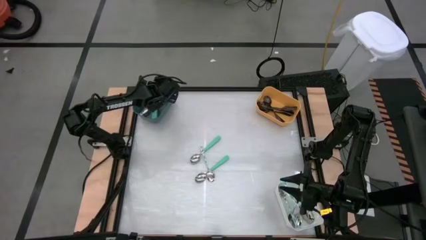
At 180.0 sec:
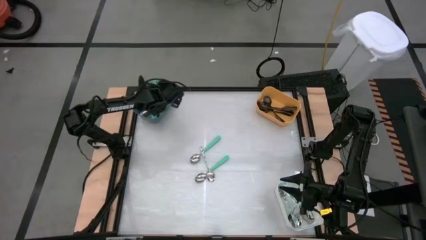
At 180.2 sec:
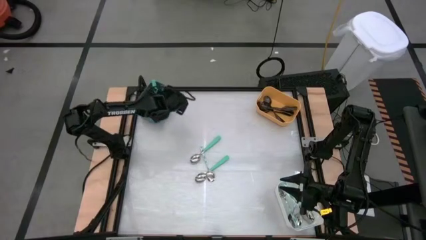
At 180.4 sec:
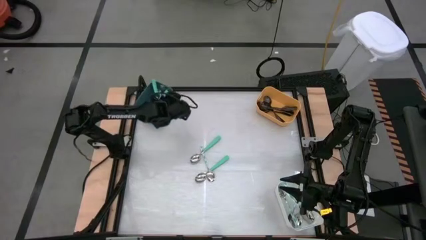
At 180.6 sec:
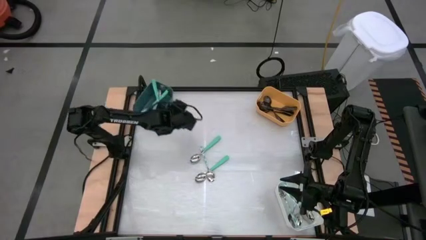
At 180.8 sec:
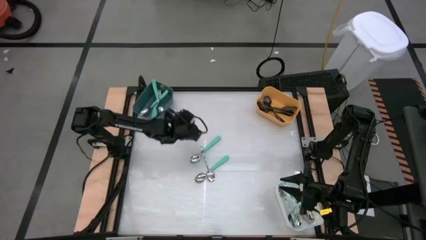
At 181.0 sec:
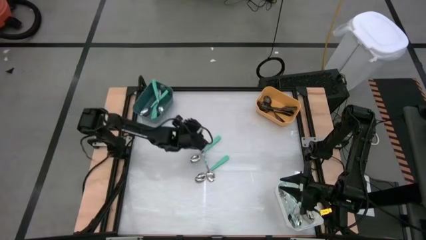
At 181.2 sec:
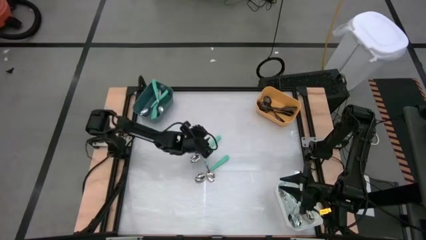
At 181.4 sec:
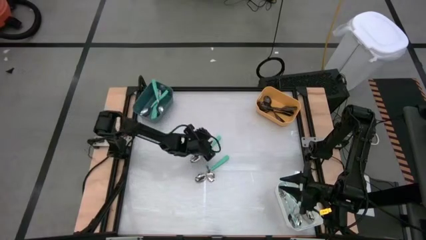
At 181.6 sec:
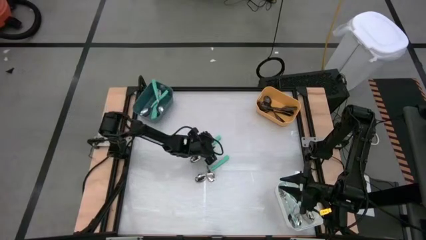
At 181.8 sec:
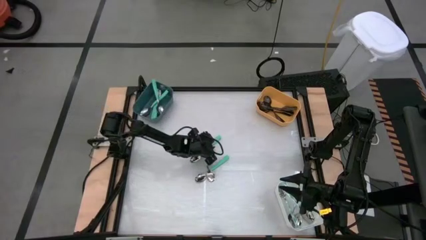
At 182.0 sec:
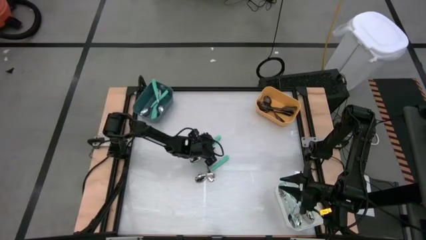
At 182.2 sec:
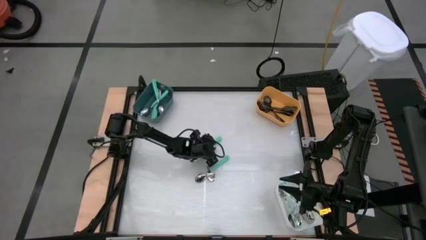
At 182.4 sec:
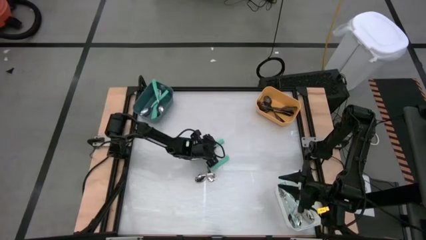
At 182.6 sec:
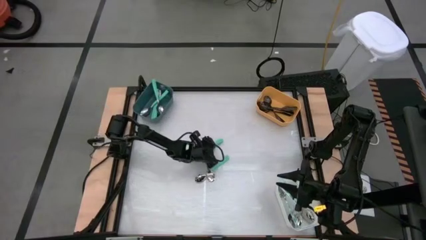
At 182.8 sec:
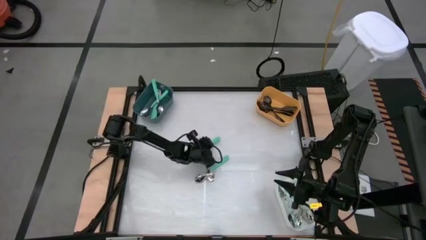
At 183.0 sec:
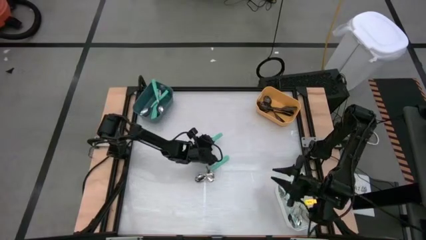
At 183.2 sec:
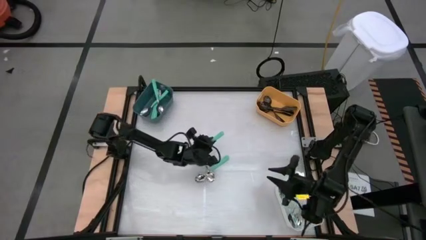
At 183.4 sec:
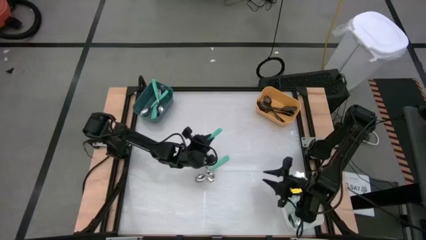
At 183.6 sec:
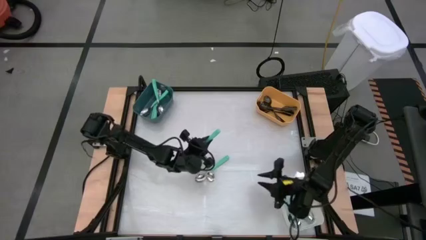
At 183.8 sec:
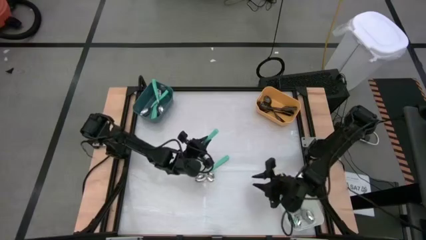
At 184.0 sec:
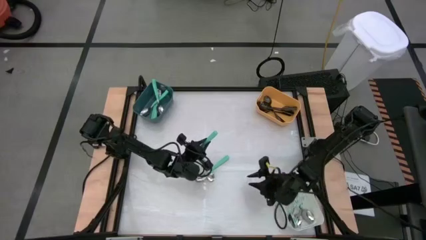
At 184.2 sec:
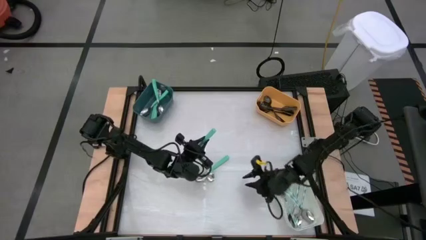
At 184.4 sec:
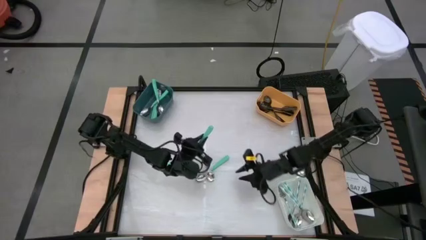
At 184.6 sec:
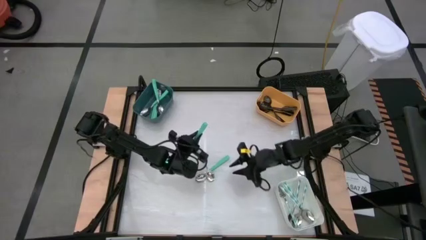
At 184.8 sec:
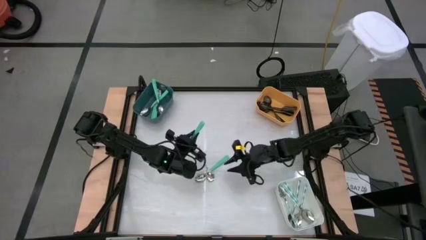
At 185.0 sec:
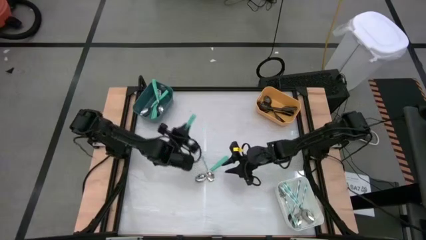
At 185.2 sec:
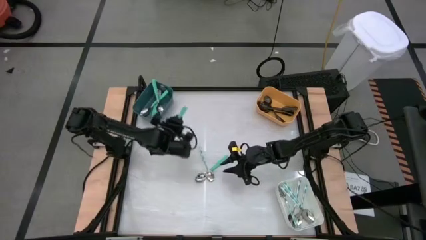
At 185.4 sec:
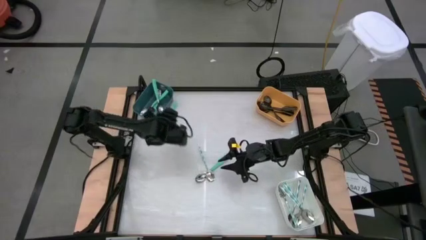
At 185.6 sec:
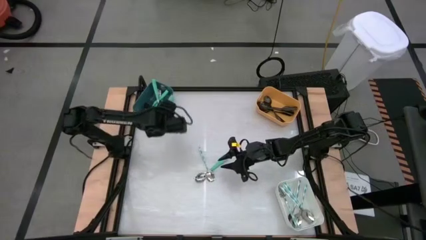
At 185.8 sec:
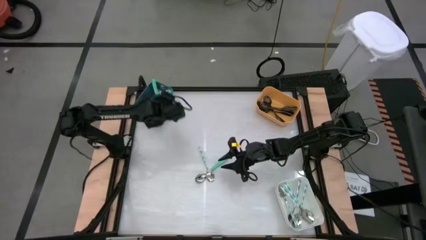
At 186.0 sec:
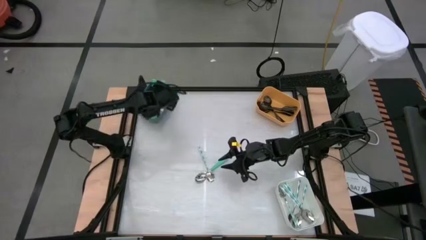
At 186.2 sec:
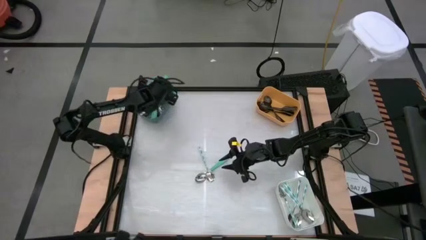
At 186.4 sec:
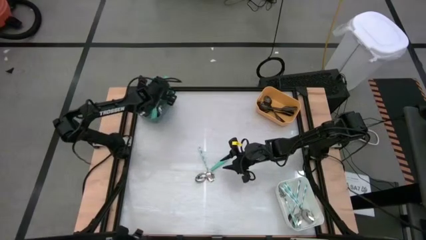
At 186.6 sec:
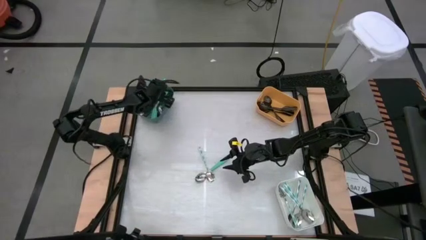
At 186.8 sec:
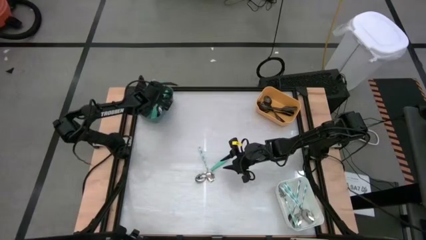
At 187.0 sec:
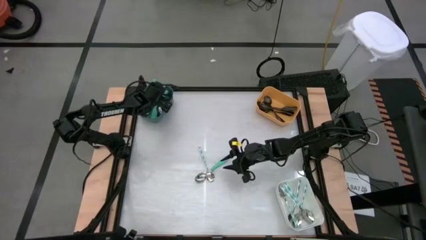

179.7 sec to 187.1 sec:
Task: Sort silverware by color (type)
Put the green spoon into the blue bin

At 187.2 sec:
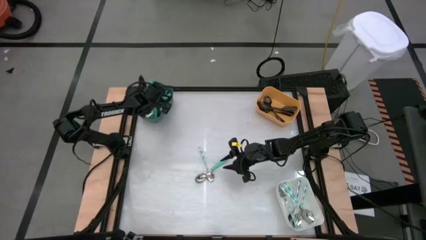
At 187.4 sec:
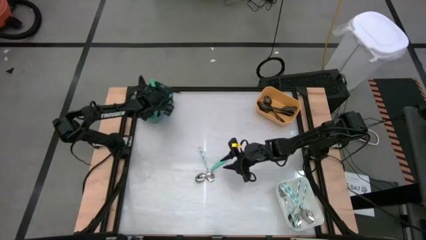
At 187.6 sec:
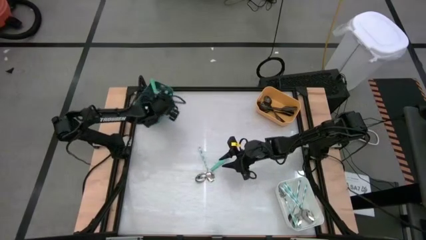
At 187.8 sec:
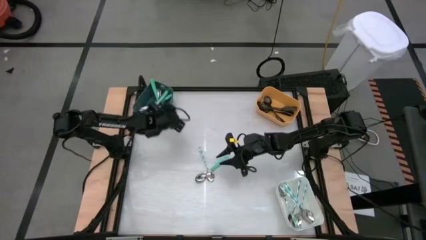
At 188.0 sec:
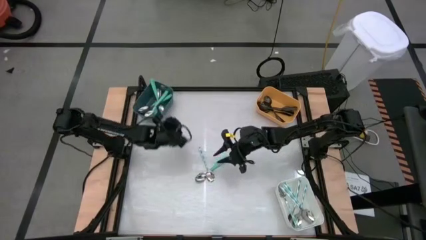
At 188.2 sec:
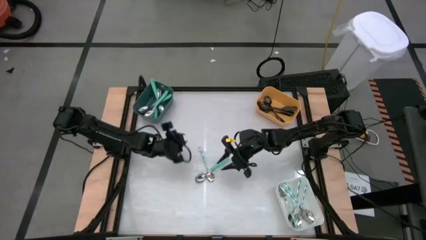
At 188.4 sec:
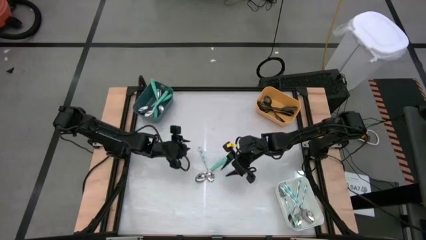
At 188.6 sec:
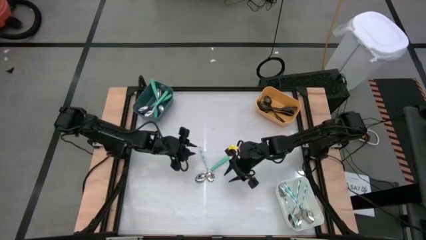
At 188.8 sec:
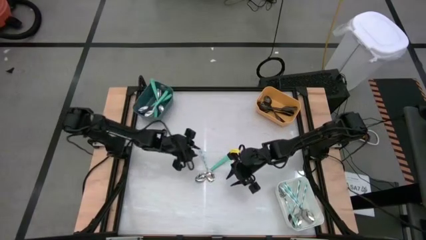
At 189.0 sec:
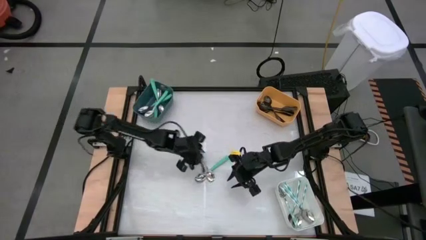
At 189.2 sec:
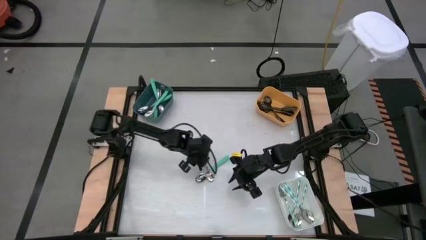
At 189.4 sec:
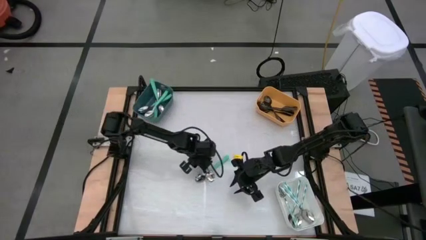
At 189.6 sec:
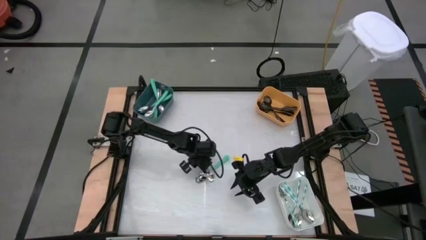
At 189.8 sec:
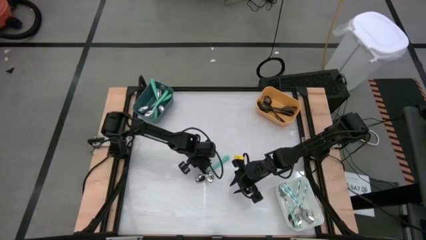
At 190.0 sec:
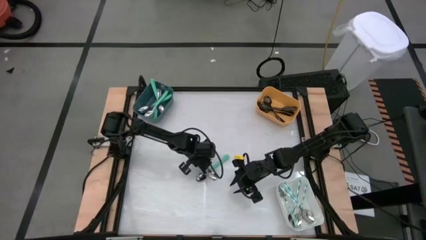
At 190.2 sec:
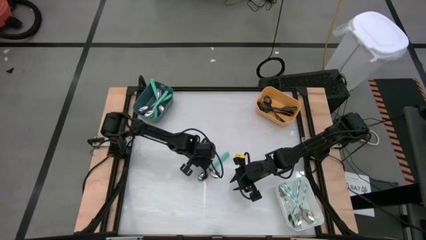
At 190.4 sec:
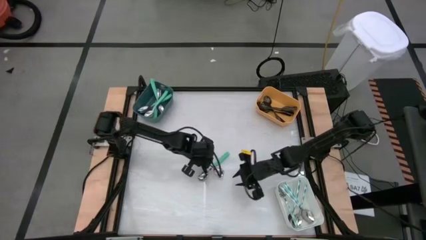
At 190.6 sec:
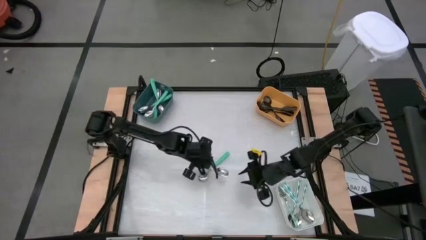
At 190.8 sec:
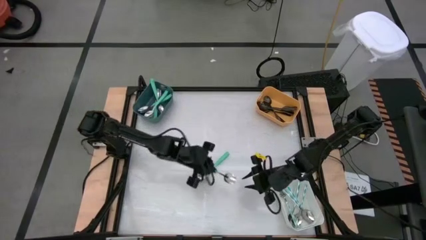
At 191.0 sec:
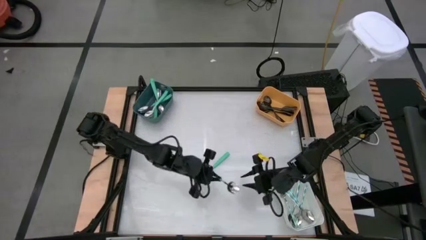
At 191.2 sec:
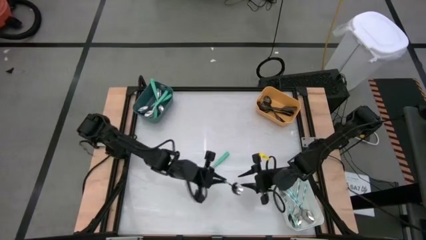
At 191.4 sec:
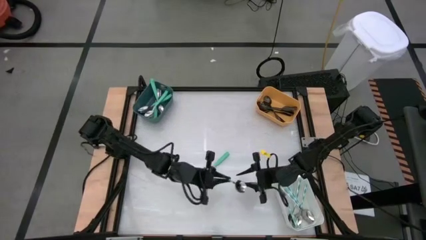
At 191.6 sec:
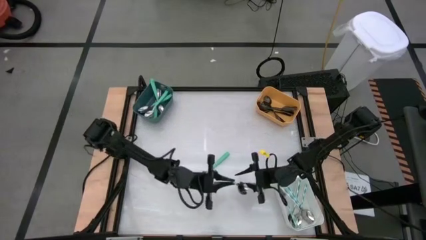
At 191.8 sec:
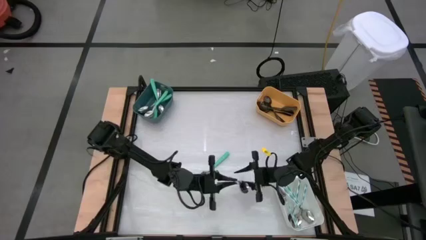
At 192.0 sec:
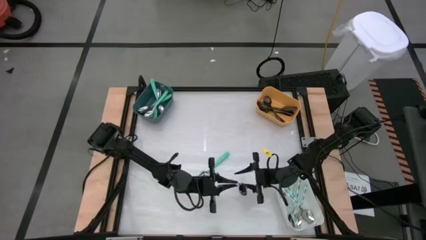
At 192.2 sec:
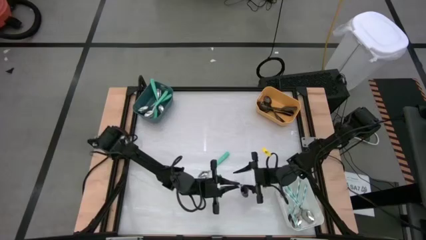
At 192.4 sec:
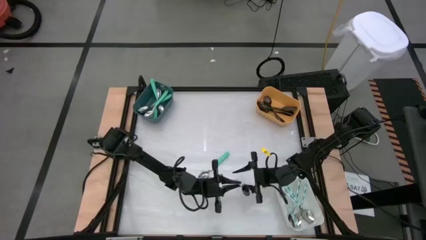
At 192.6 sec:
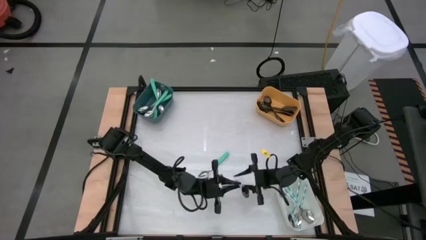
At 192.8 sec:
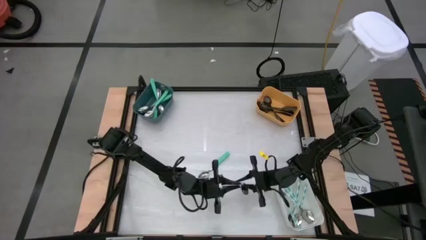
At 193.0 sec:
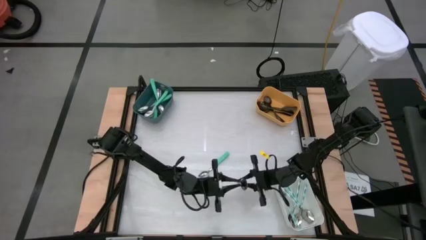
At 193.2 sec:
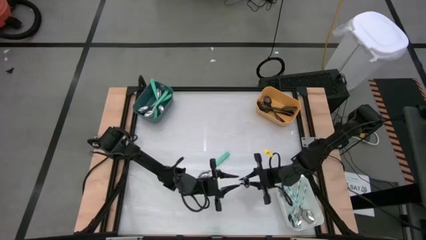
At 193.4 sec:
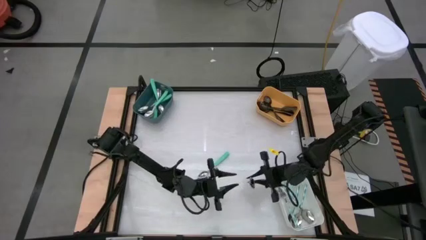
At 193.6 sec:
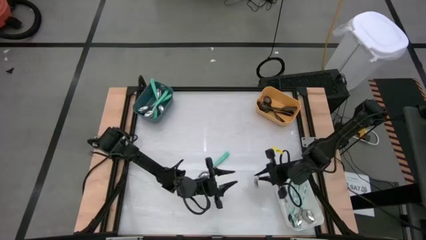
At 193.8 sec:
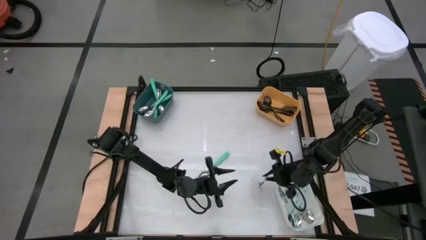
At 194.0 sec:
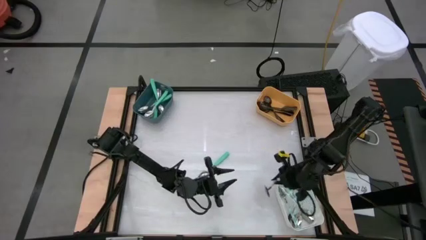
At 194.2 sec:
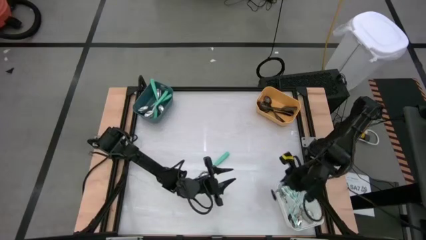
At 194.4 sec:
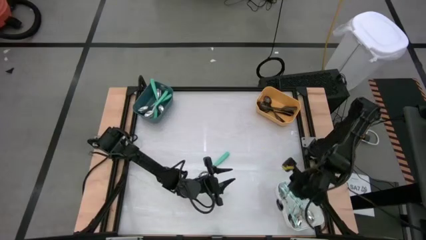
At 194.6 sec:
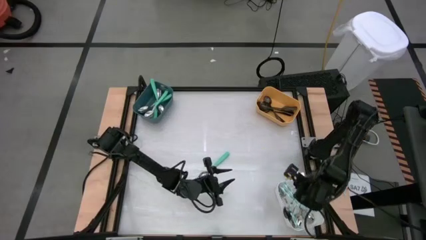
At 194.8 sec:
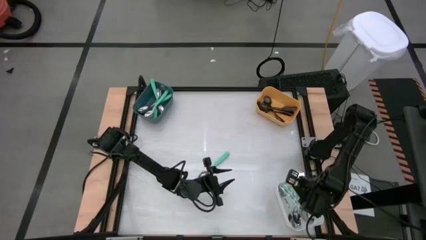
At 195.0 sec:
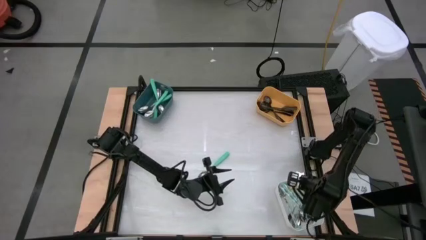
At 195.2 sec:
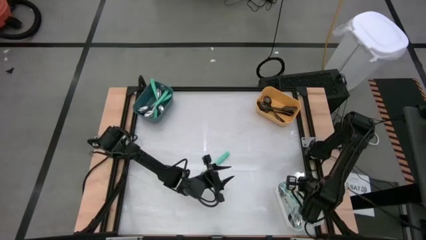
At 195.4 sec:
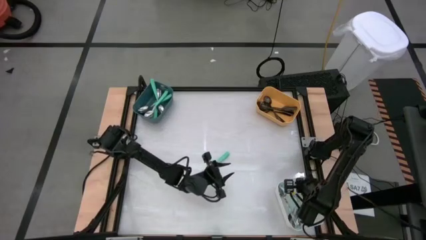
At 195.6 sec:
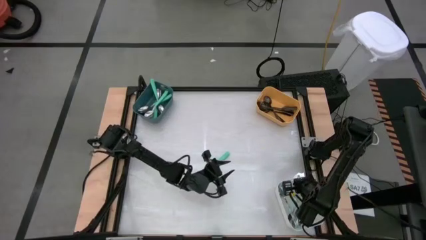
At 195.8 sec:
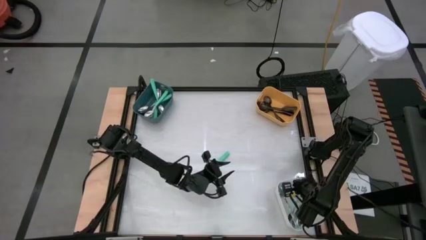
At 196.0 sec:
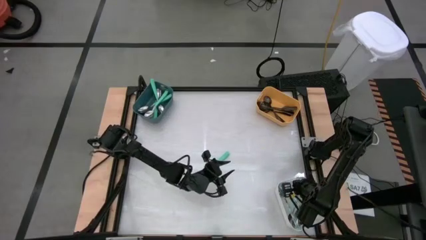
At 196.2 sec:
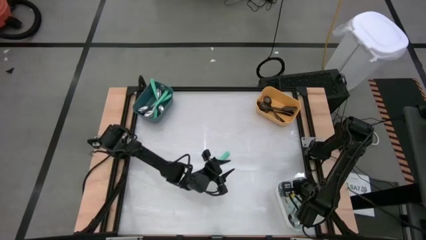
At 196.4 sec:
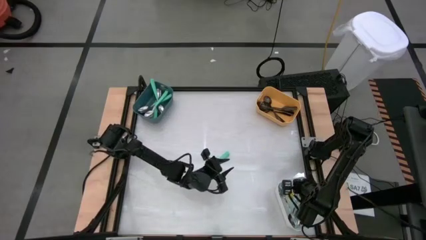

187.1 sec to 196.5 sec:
Put the patterned green spoon into the white bin
